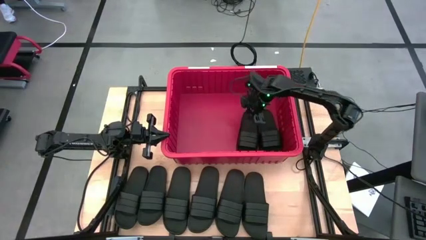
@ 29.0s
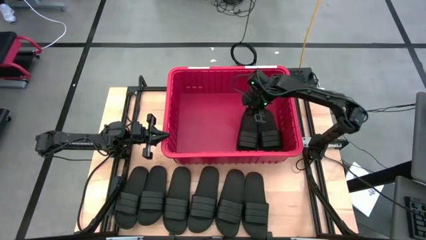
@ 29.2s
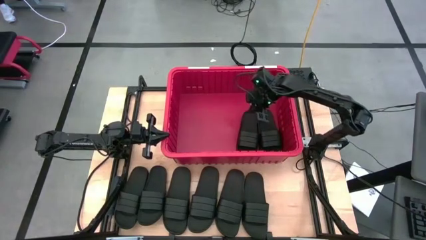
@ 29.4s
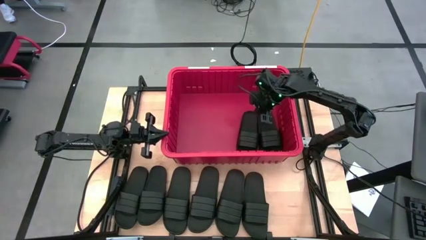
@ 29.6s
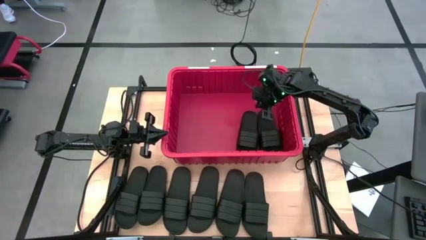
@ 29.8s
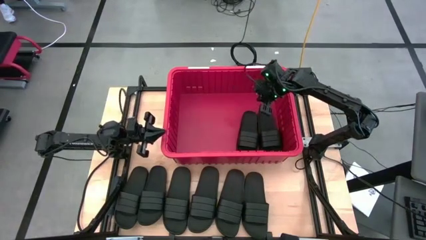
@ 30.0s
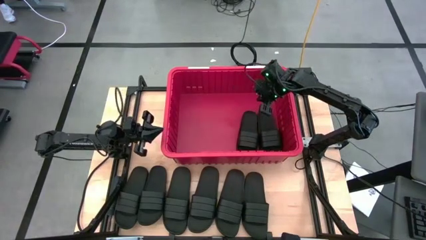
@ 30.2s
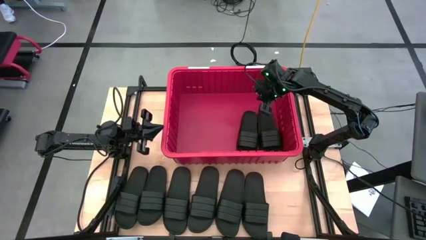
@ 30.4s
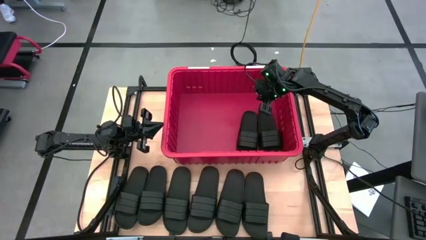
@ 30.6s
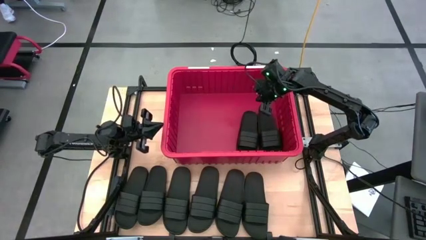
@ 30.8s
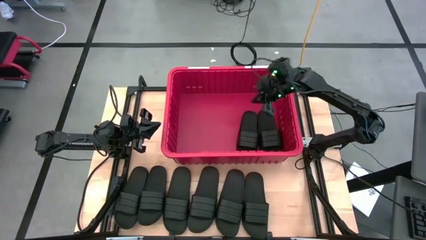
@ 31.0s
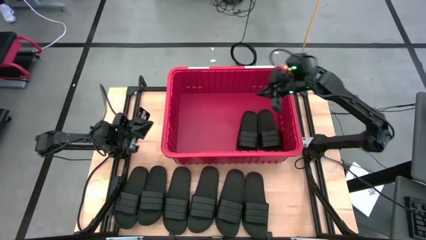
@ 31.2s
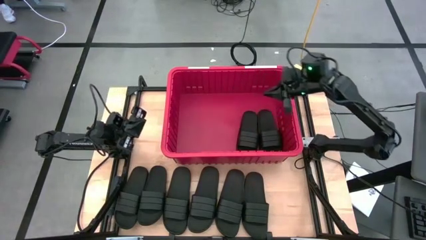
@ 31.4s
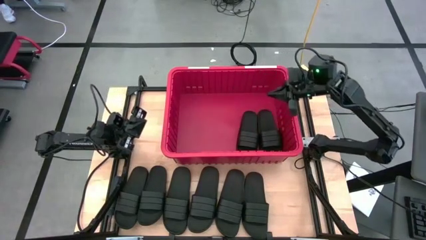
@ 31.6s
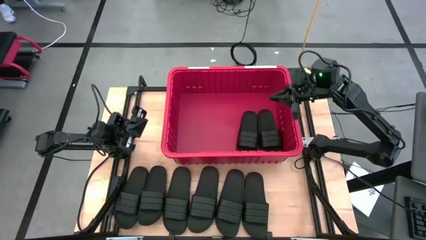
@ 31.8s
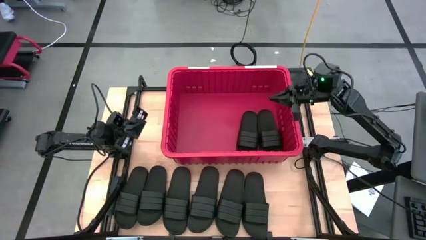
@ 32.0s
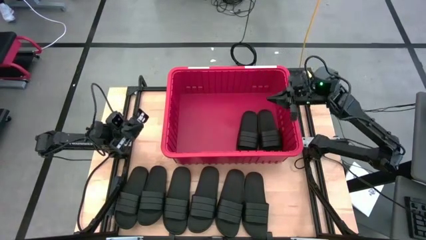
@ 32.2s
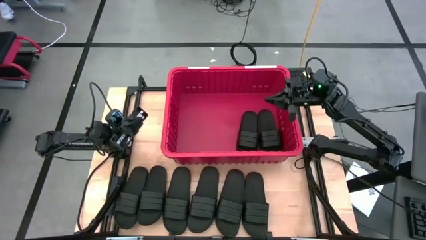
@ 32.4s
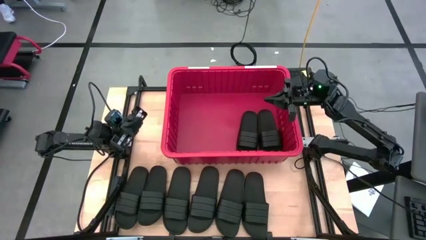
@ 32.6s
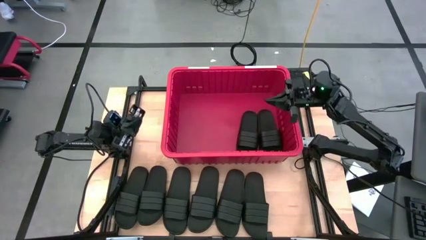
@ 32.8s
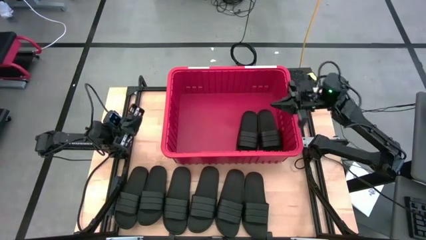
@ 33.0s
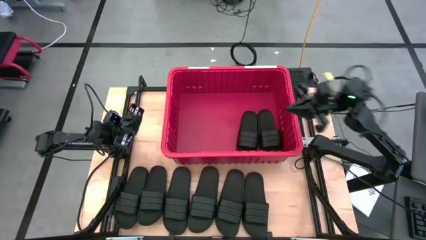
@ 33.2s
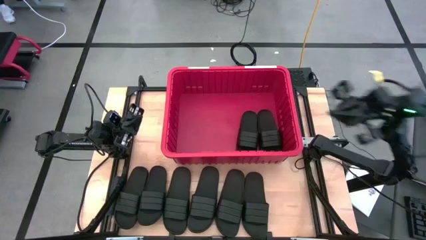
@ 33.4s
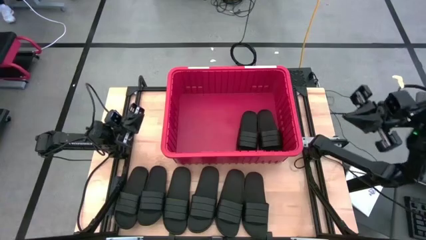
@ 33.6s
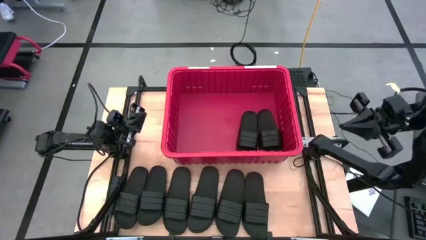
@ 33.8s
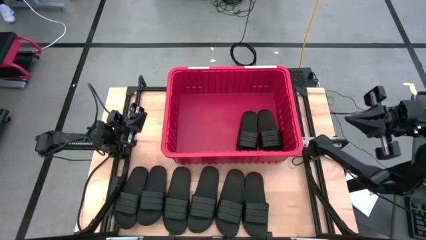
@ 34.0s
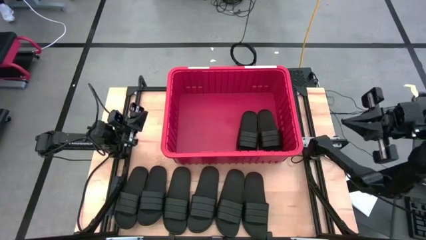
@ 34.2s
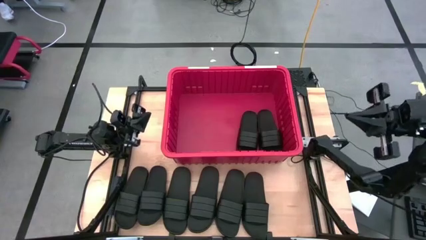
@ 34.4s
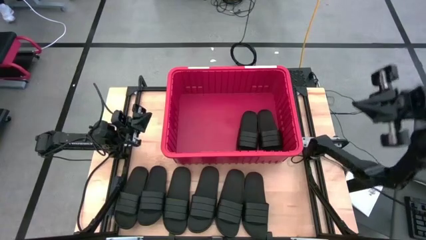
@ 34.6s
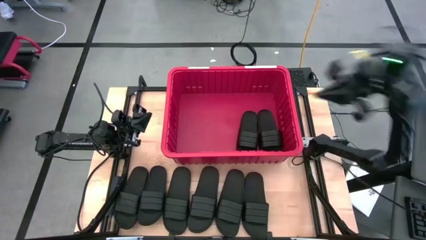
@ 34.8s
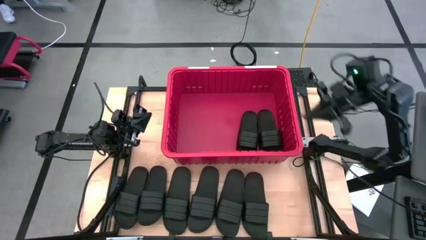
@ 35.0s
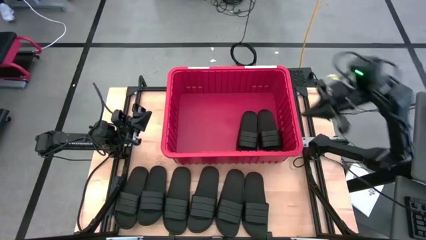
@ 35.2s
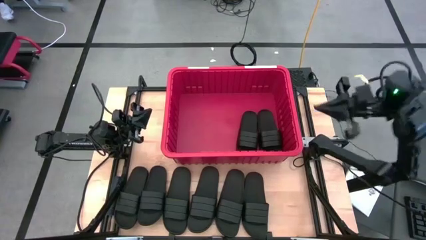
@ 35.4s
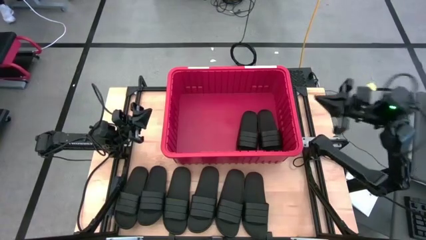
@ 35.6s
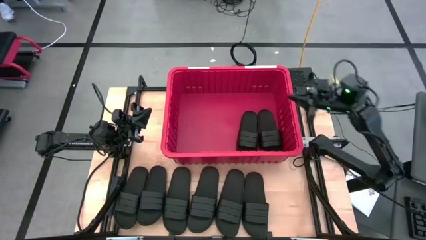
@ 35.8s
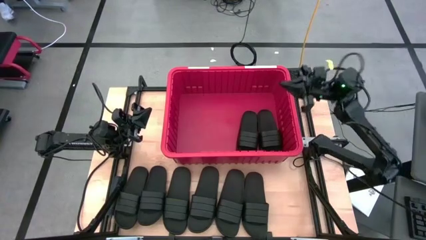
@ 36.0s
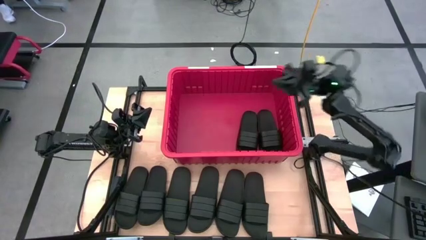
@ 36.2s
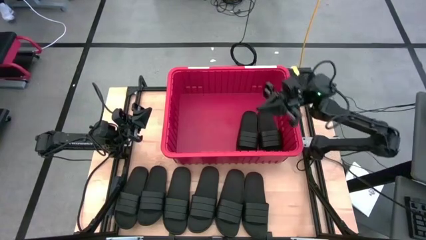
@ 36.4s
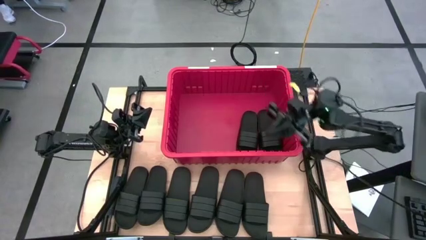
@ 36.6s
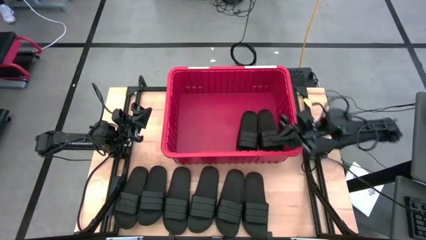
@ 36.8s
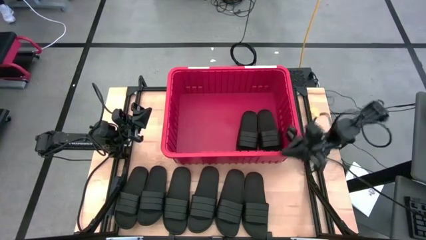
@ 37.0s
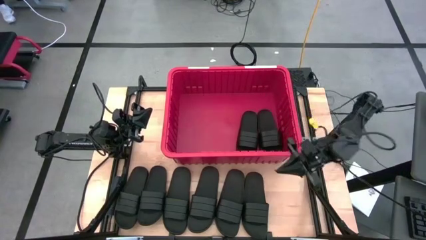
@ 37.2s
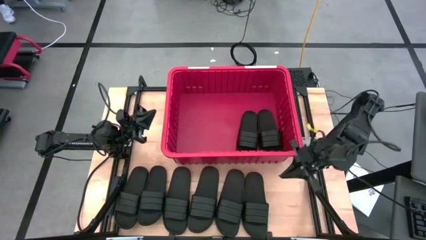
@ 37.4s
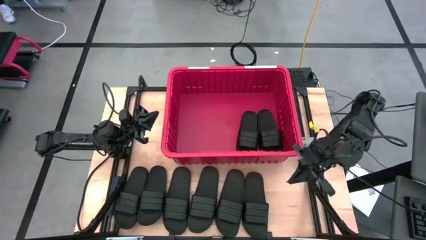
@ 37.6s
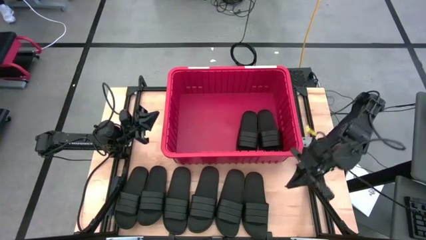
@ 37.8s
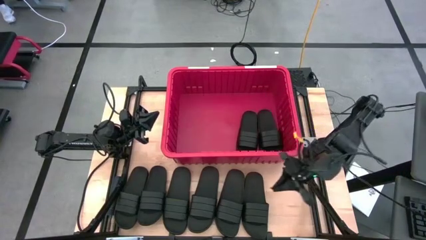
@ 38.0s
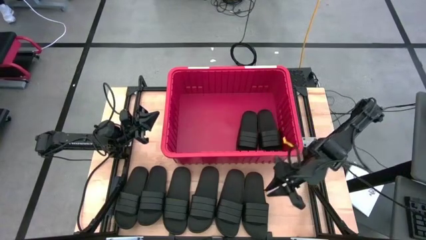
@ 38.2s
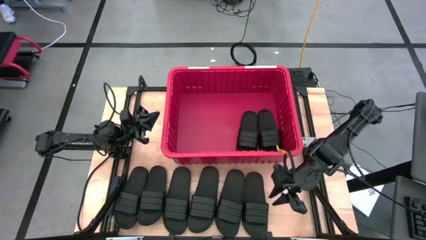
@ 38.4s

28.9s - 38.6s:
Task: Pick and place slides into bin
Put the black slide into the red bin

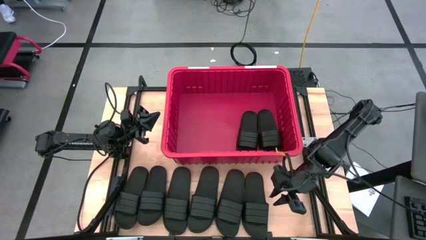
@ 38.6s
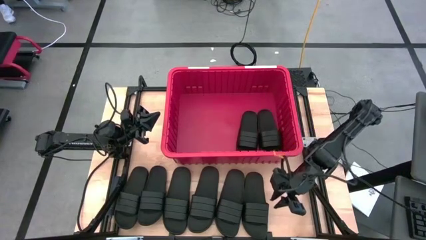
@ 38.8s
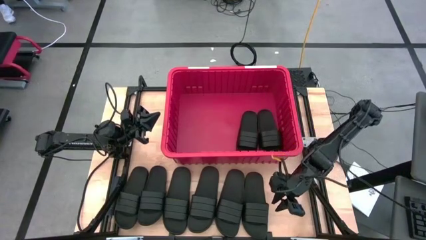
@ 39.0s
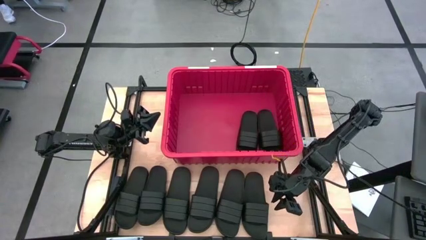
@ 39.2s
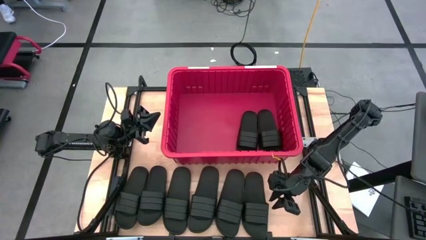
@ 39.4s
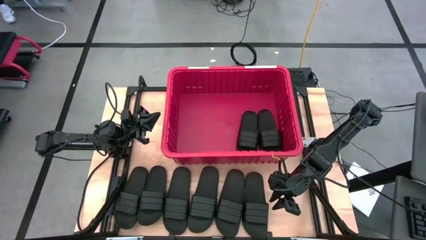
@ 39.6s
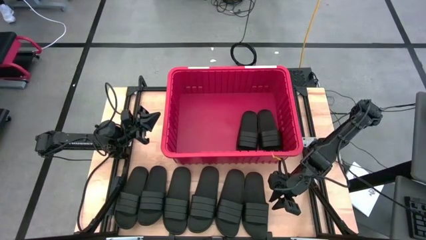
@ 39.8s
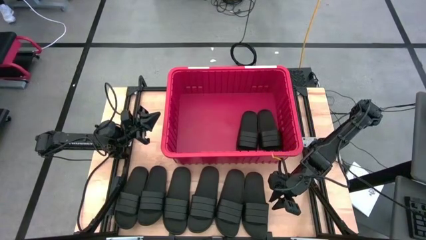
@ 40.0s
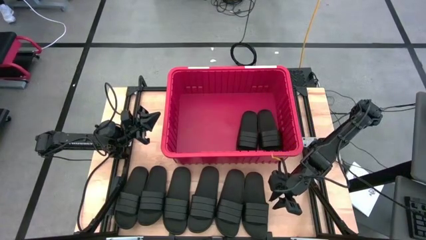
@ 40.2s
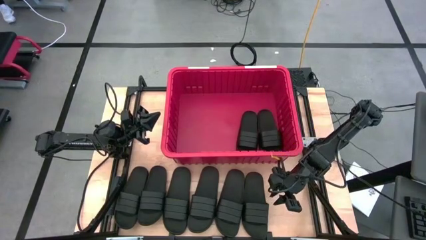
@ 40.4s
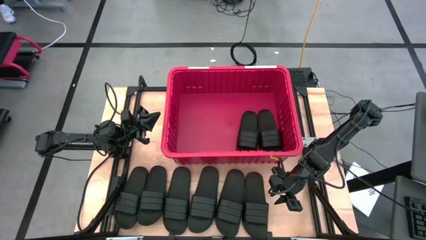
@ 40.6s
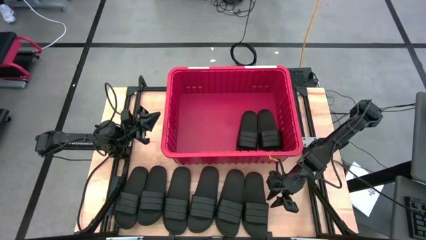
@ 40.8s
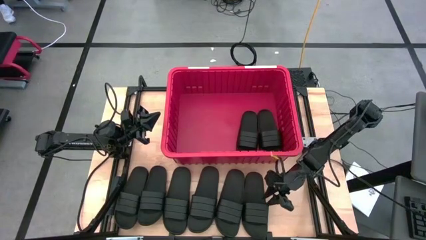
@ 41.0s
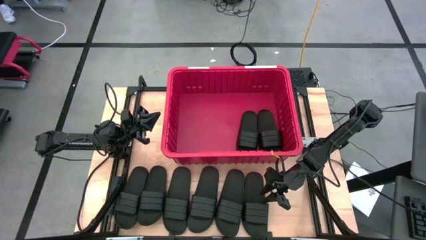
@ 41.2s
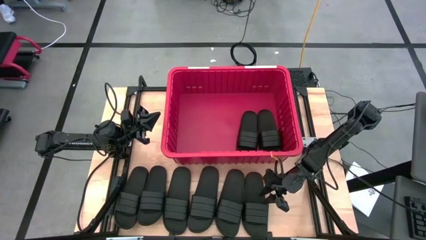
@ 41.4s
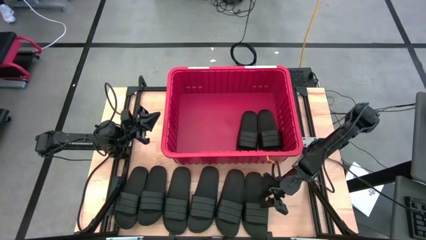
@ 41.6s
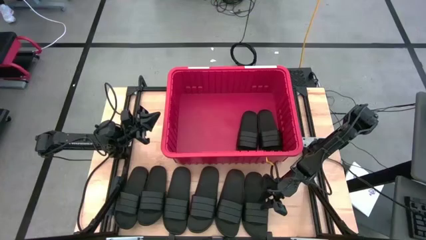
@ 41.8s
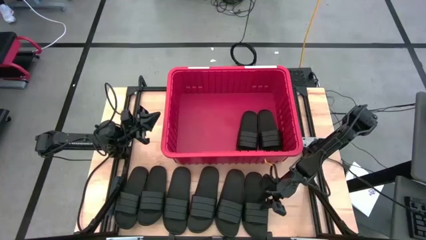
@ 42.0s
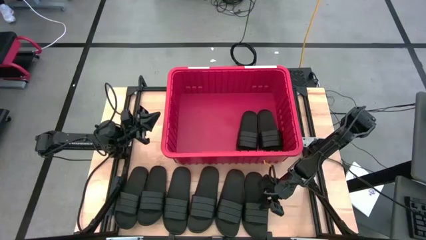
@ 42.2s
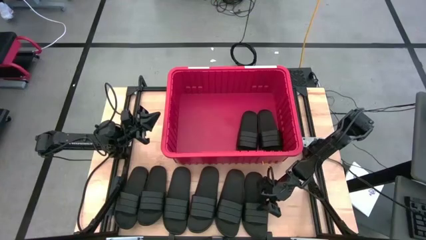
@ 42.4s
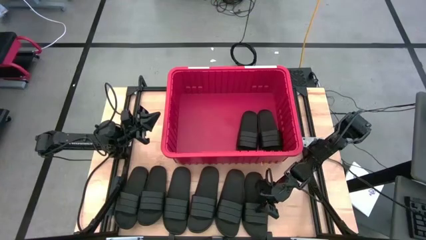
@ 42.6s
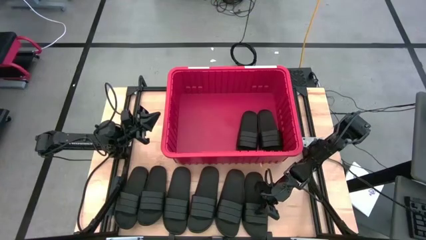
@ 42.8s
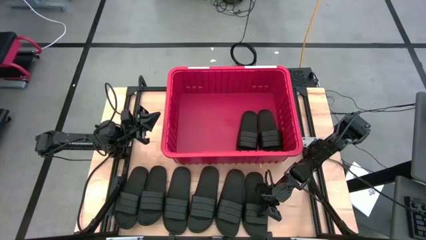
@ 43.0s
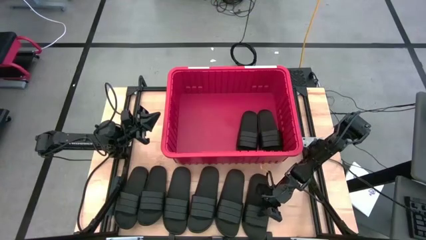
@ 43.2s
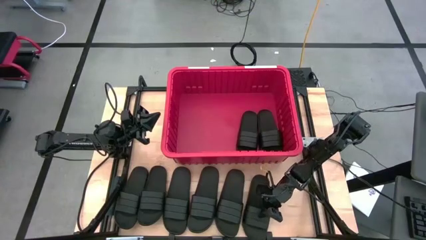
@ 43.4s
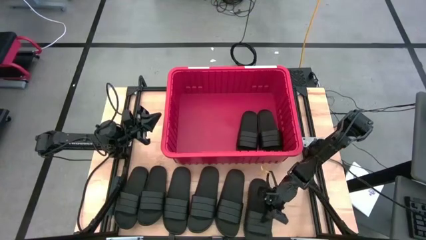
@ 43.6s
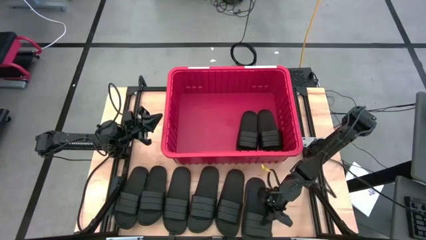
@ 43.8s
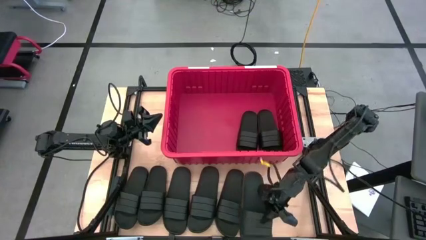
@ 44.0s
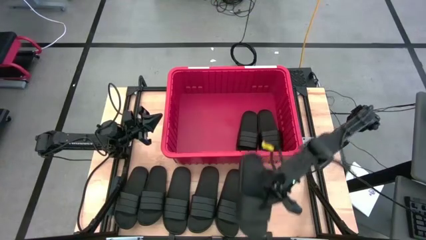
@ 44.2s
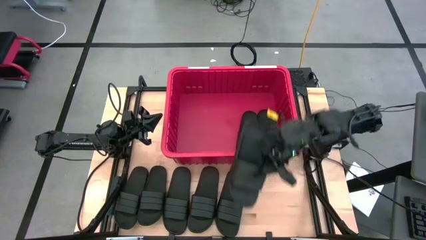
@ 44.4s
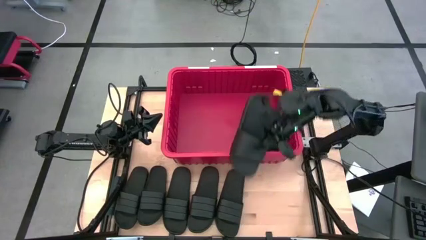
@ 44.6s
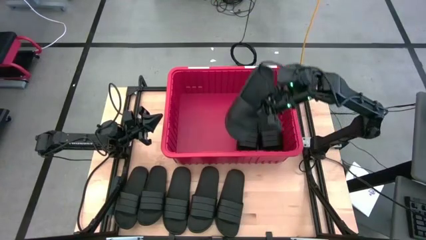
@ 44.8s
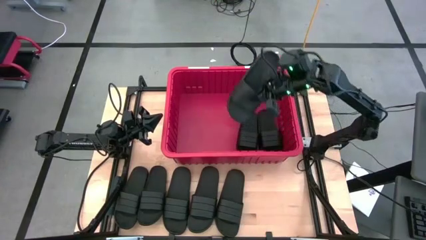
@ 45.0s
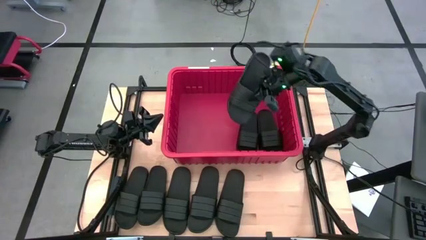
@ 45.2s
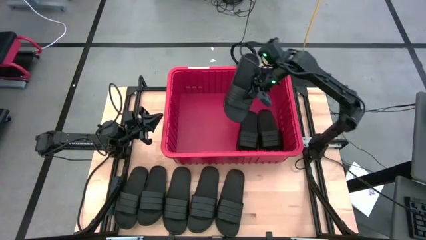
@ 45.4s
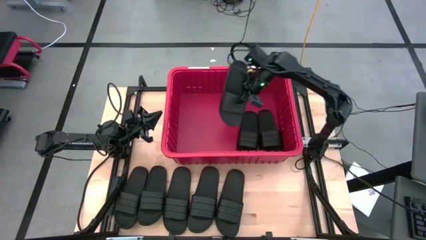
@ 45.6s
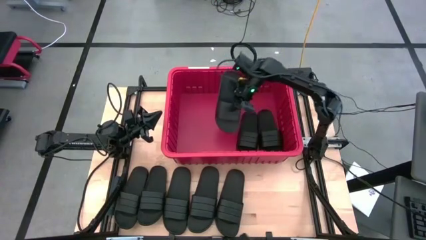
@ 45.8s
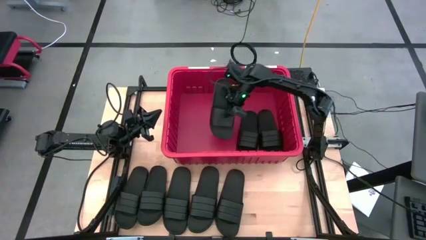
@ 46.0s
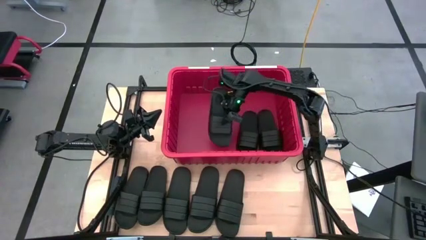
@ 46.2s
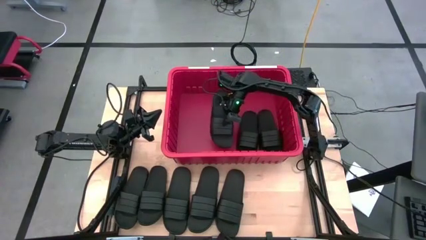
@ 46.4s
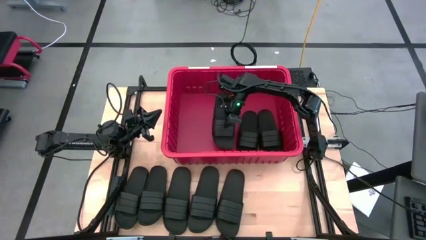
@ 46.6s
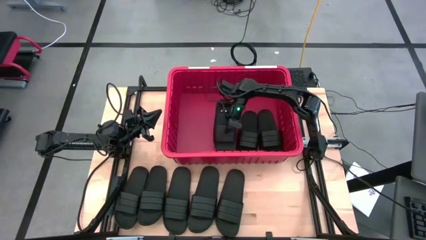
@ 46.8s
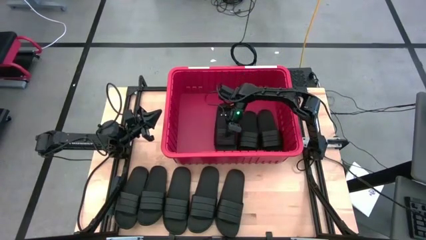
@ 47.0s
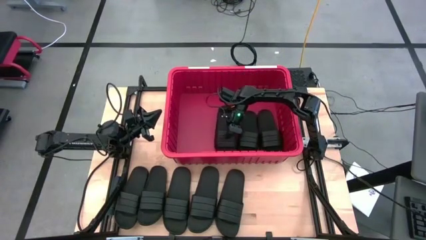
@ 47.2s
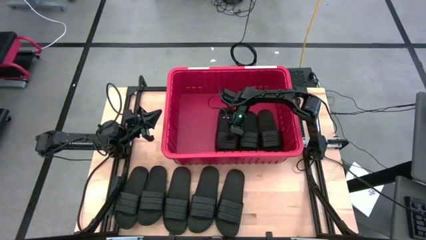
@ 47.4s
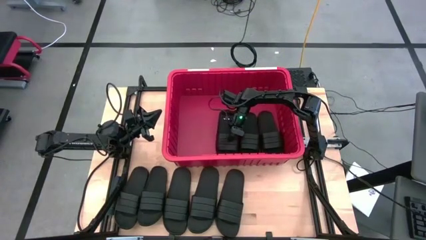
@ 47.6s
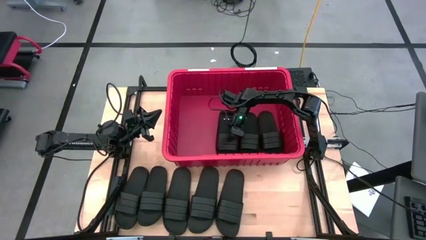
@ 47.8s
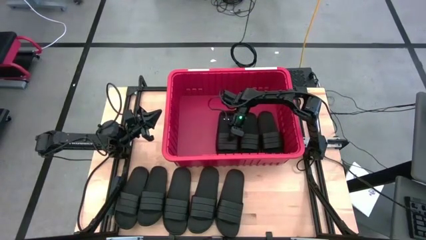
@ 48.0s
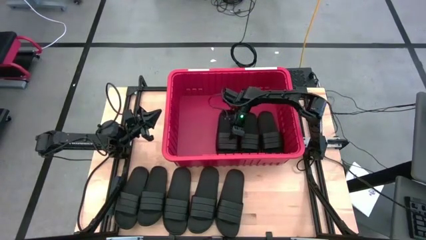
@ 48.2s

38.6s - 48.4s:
Put the black slide into the red bin
